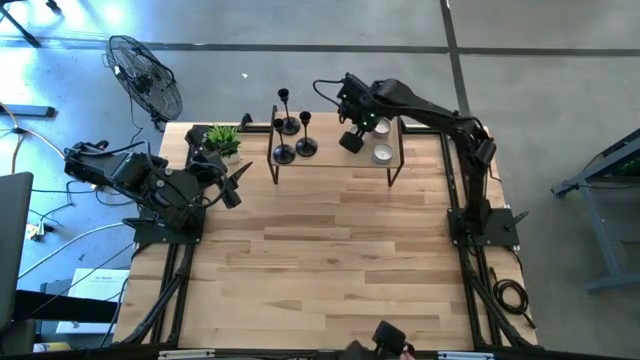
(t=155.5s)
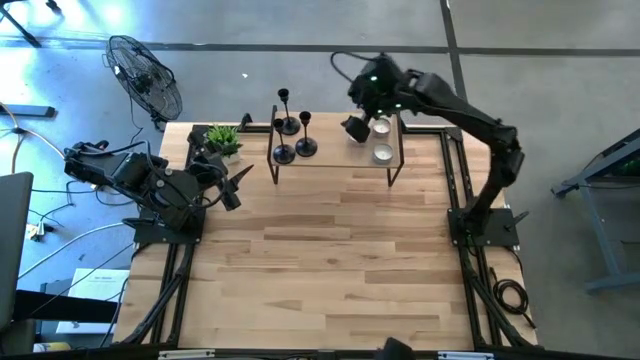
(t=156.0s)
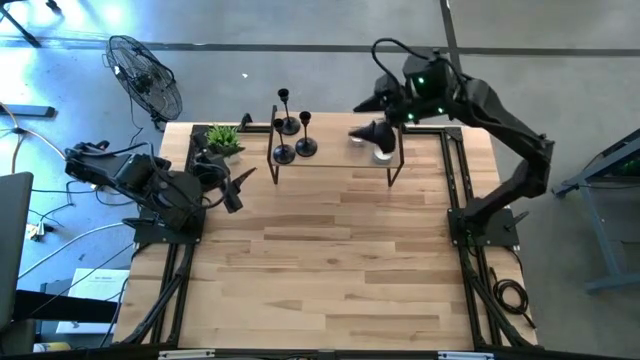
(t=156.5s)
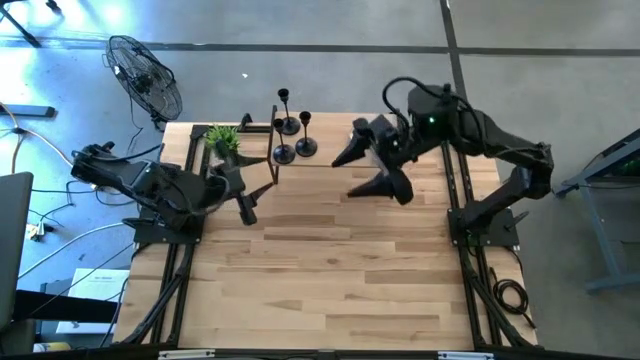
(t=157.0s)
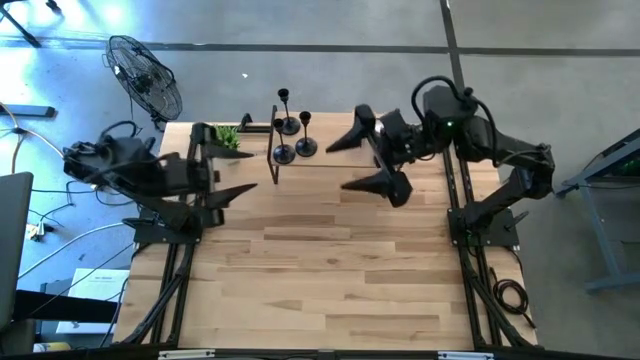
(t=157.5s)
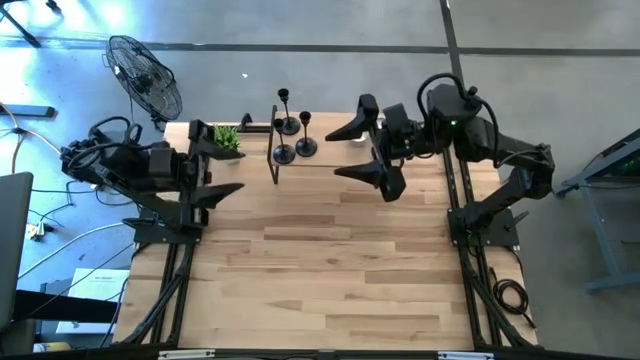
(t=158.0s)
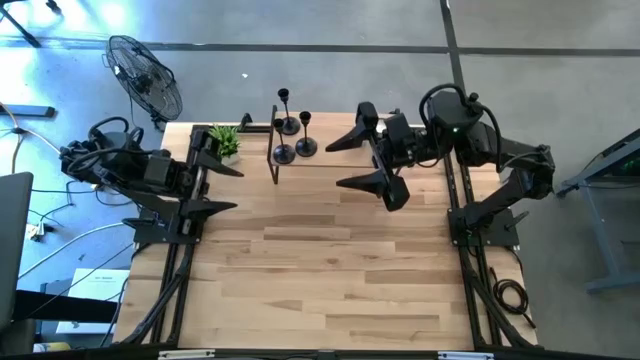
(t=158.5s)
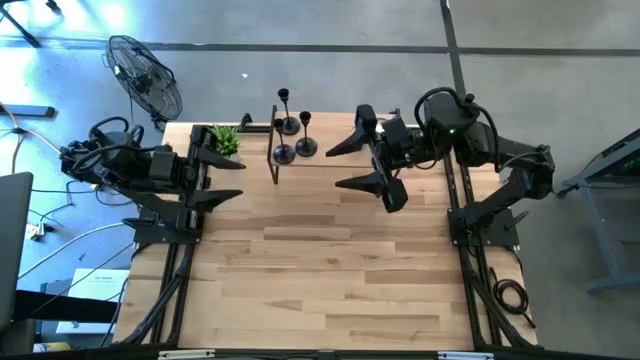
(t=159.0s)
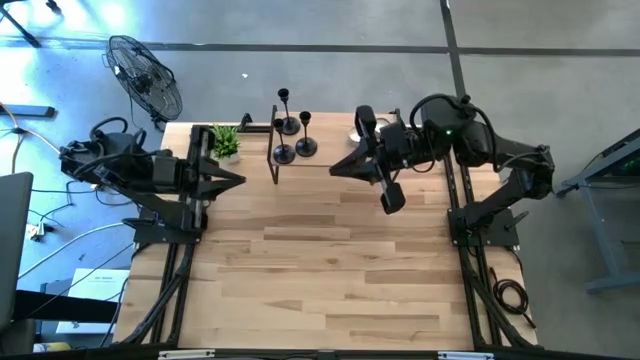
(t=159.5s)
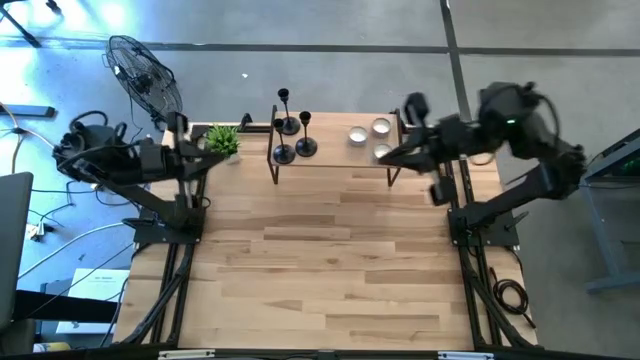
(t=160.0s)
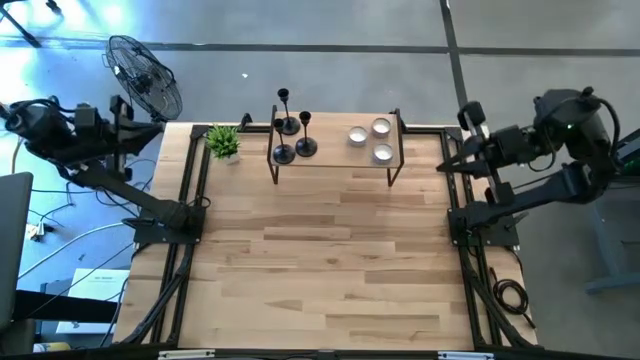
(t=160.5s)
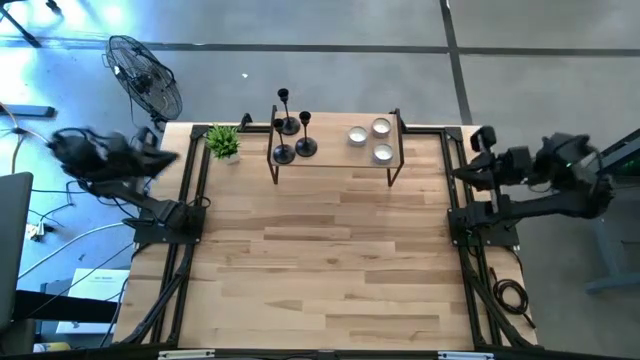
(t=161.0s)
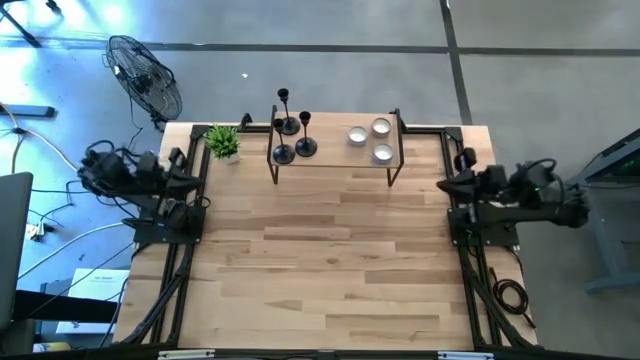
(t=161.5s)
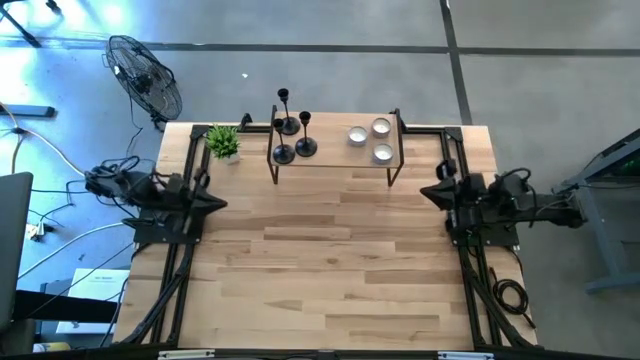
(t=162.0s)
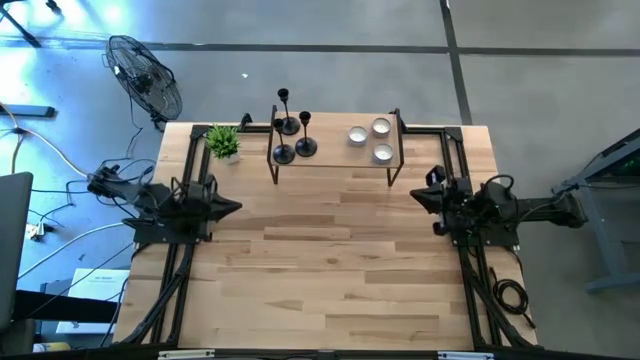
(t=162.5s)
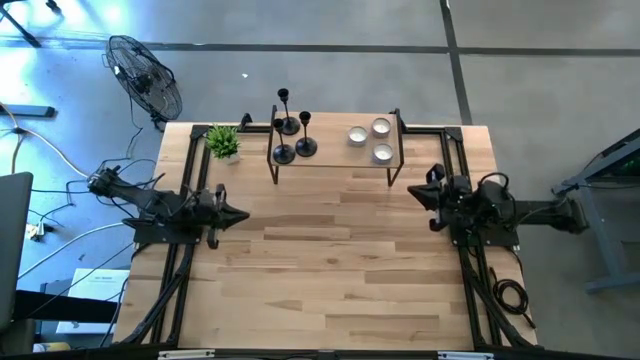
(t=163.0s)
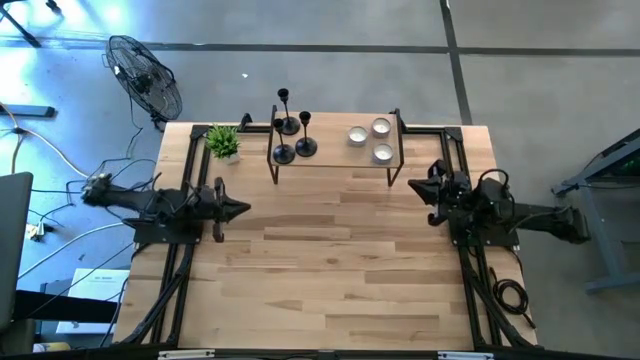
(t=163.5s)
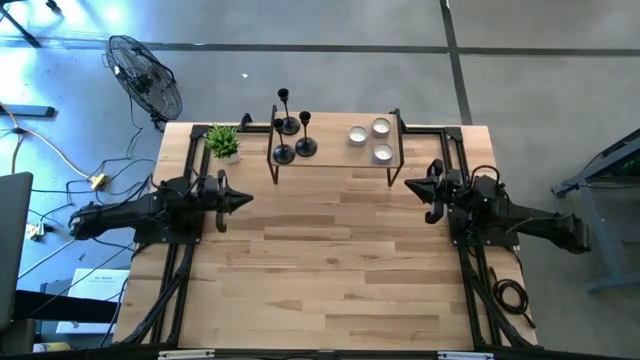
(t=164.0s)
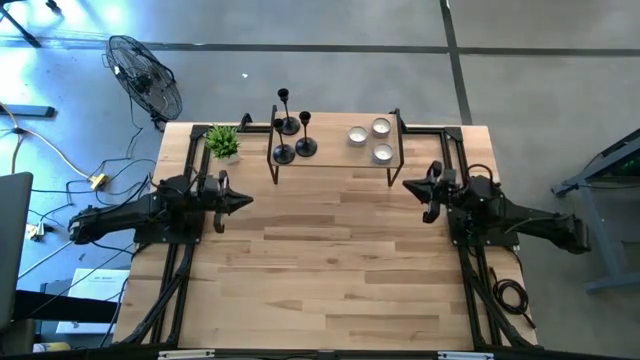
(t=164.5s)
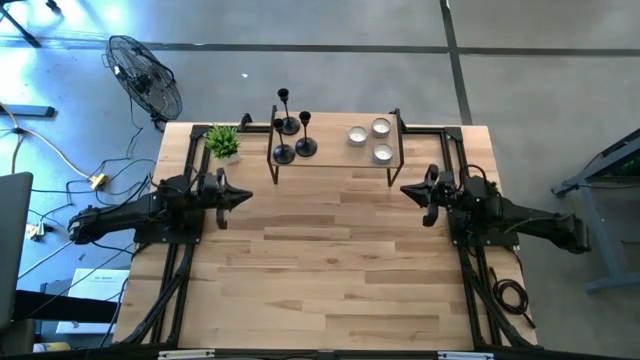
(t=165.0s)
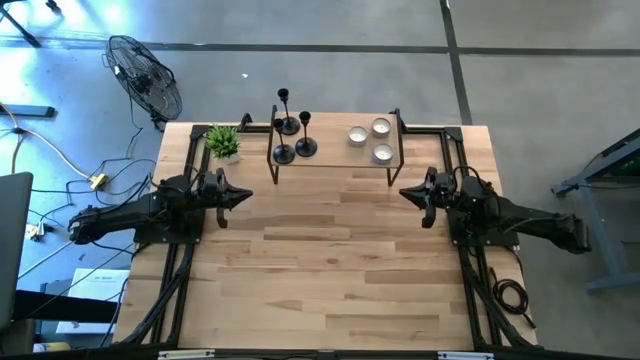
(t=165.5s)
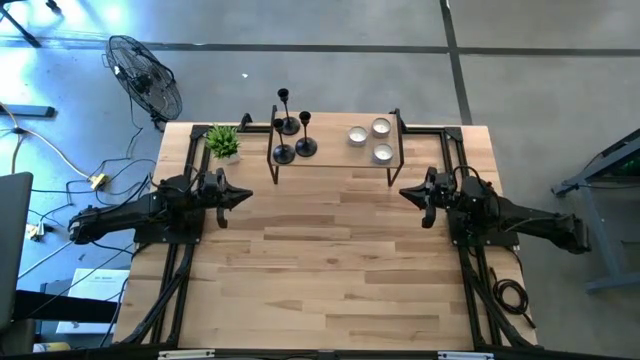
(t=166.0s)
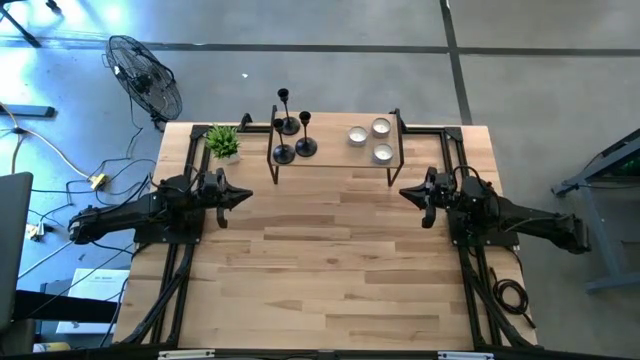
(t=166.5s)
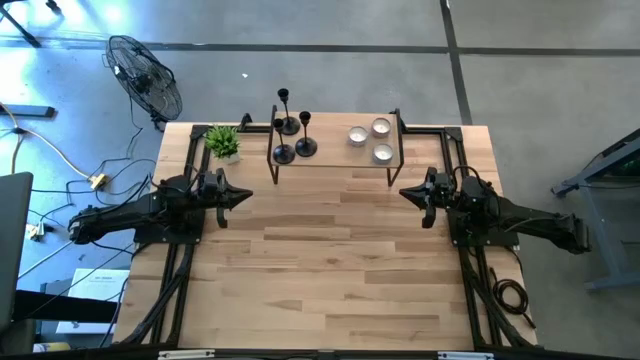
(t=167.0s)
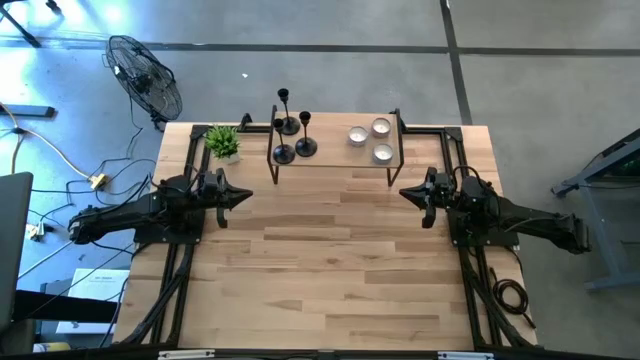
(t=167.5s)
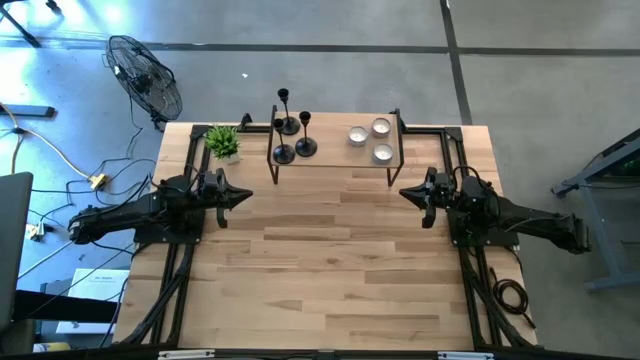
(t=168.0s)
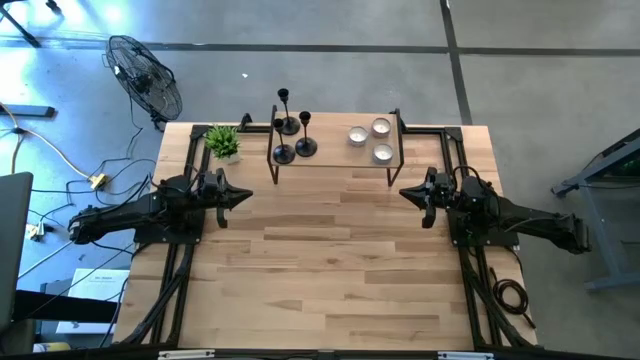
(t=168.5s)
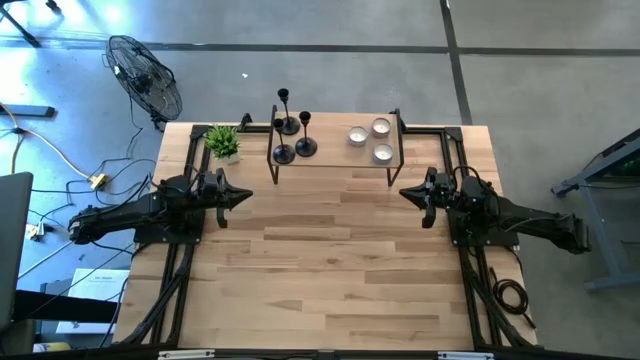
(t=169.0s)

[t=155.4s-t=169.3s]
Task: Pick & Place candle stick holders
Return to Home Position

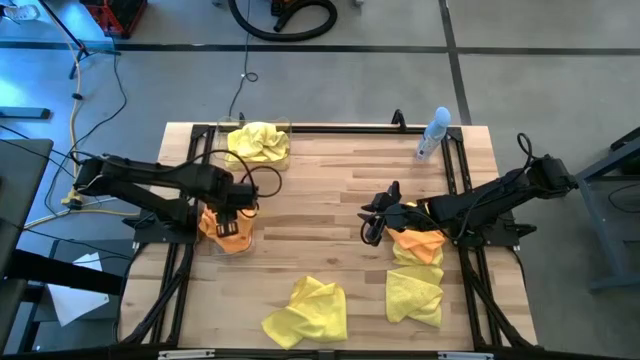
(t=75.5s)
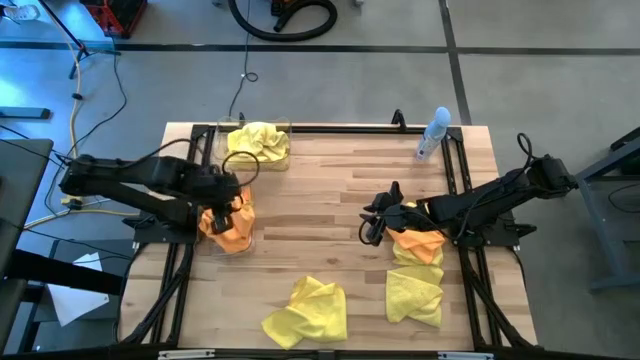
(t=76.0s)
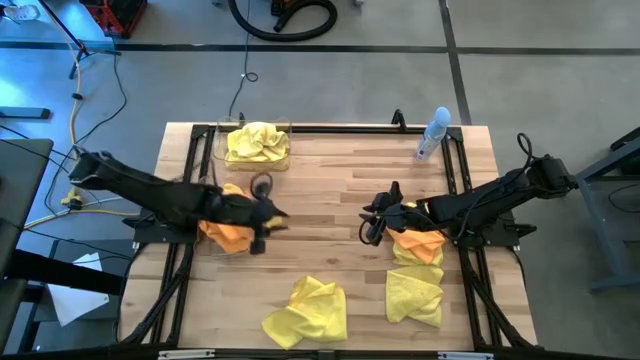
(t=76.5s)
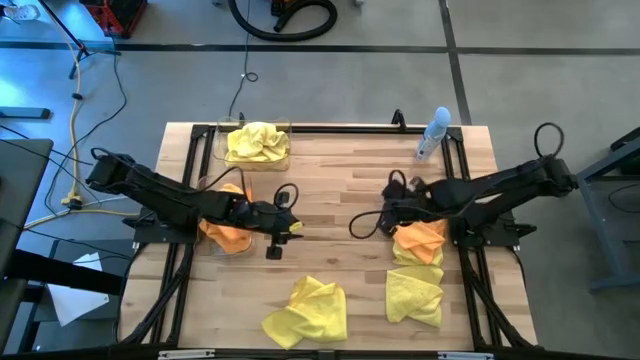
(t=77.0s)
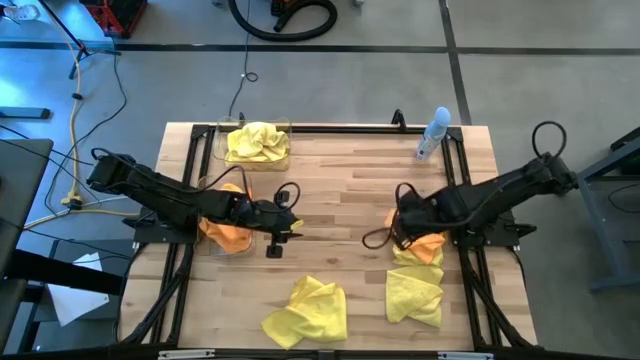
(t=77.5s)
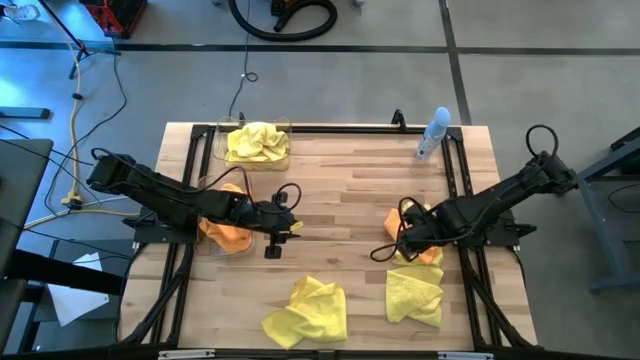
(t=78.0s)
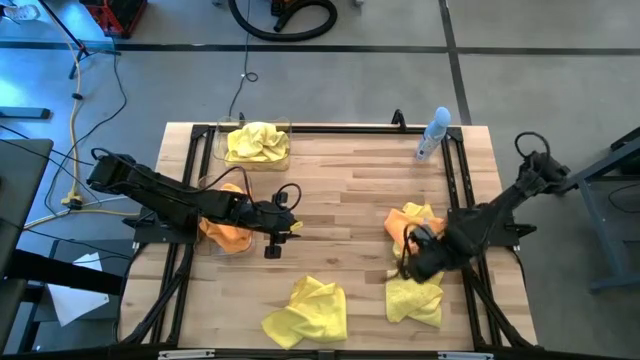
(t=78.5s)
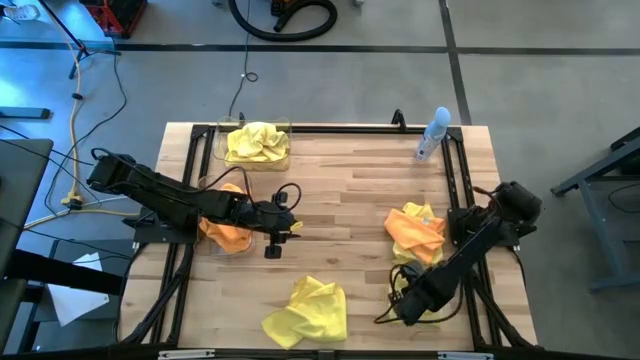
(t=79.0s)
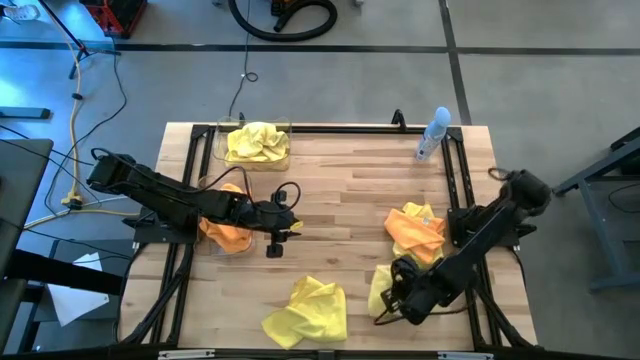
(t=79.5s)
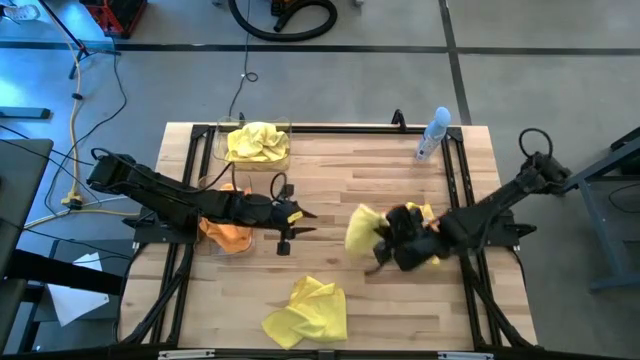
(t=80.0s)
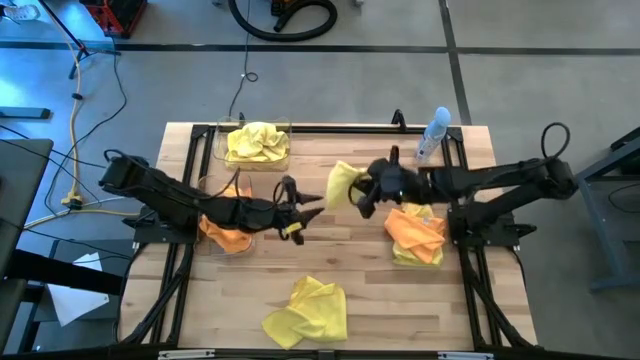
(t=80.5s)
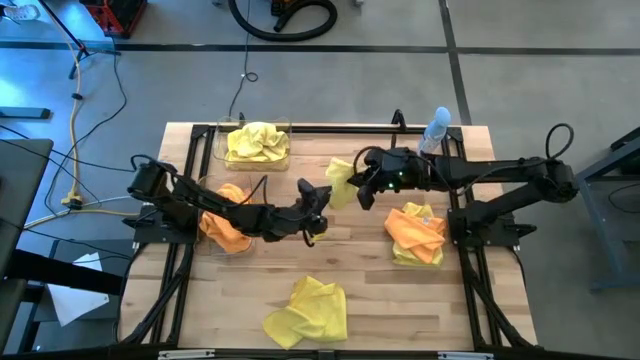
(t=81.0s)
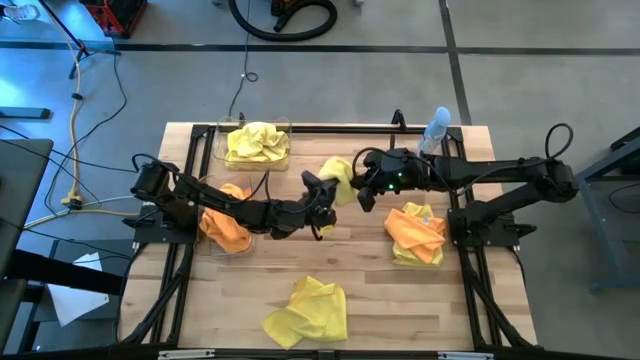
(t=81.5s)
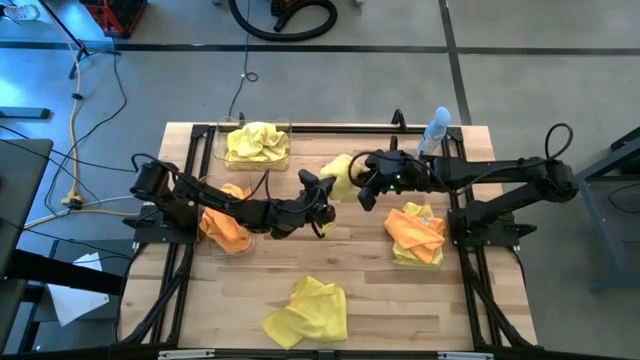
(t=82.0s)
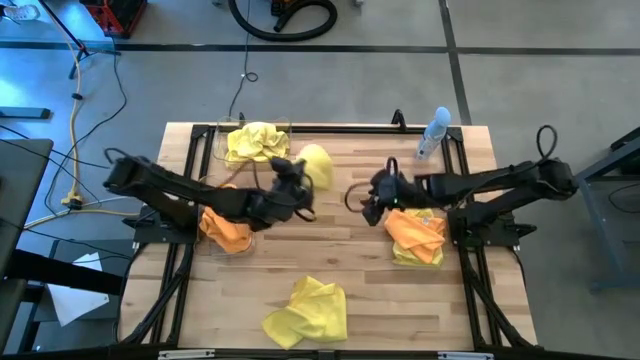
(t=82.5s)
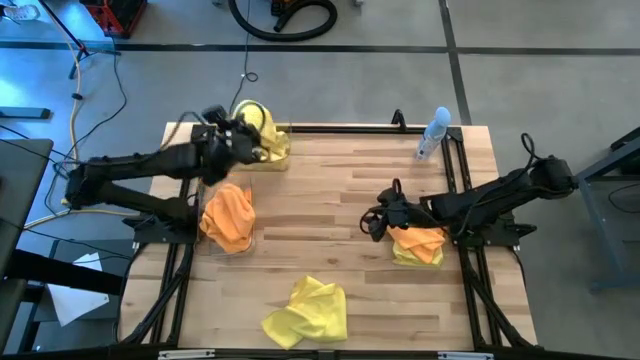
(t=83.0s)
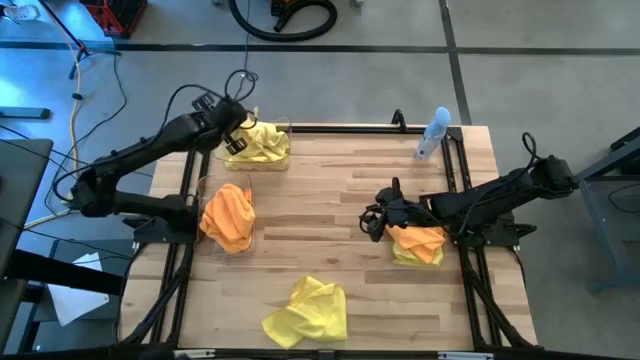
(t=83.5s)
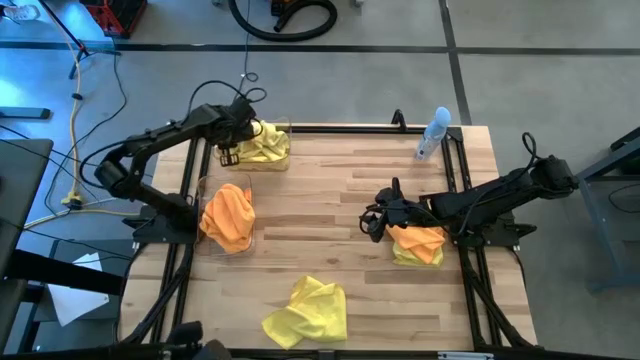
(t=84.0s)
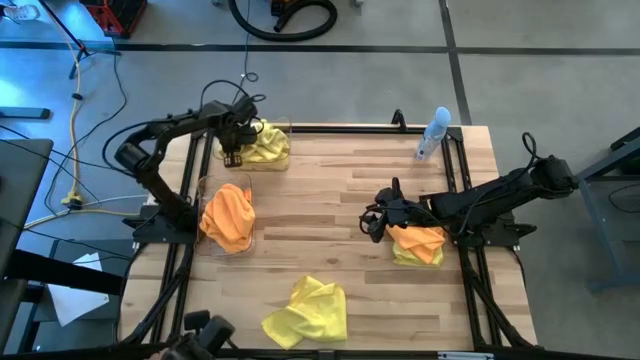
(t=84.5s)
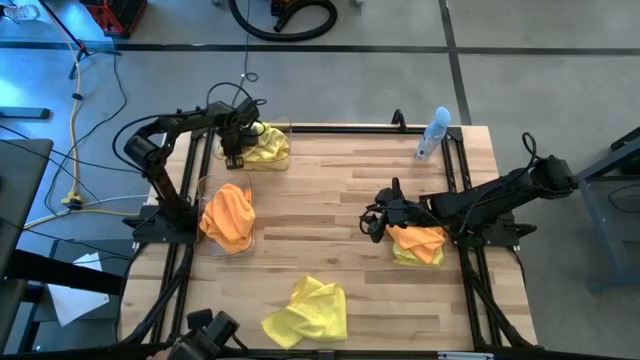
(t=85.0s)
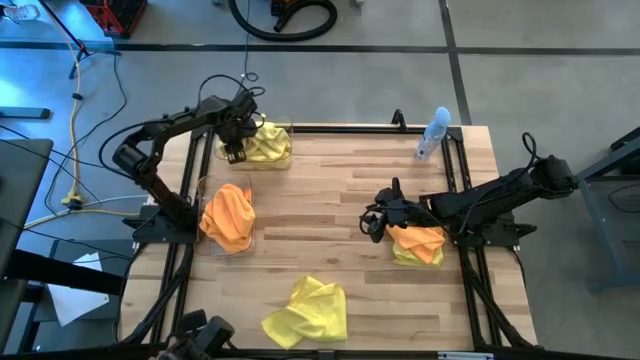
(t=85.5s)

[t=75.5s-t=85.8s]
Task: Sort microfiber towel by color & place in baskets
Put the yellow microfiber towel into the top transparent bin
